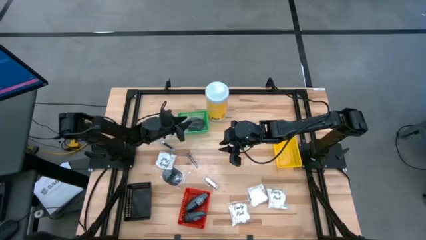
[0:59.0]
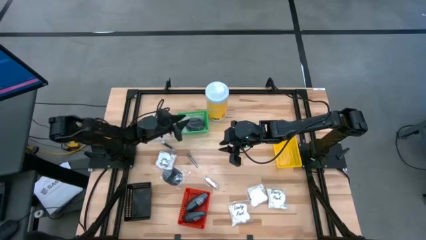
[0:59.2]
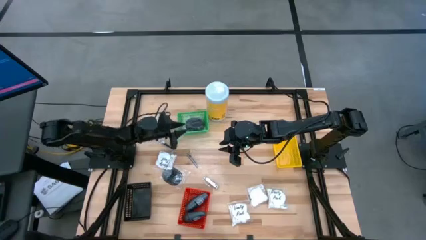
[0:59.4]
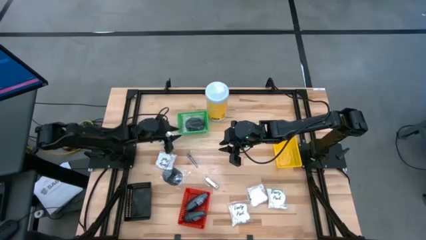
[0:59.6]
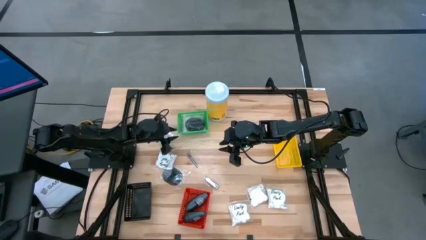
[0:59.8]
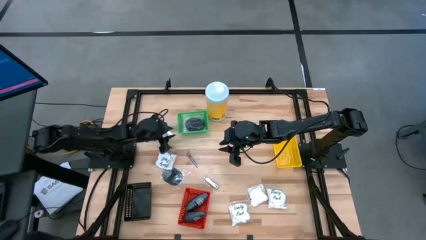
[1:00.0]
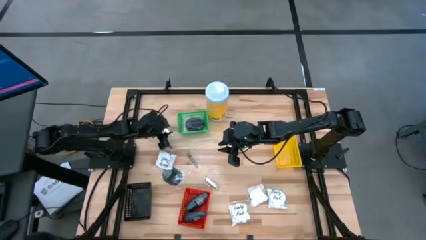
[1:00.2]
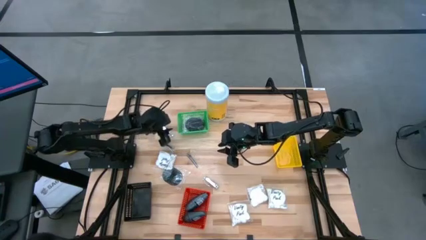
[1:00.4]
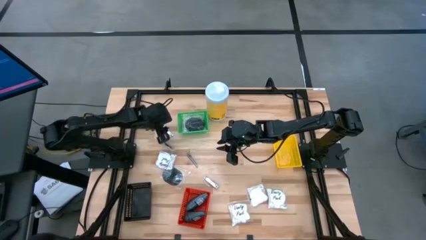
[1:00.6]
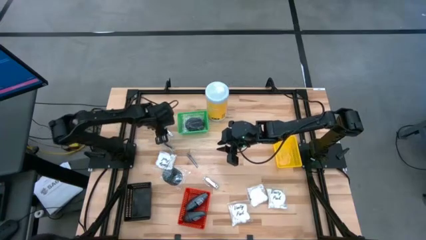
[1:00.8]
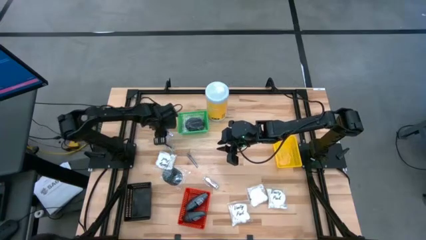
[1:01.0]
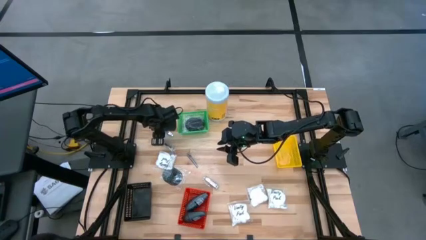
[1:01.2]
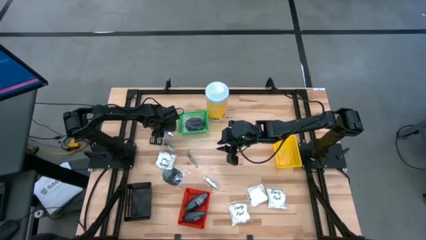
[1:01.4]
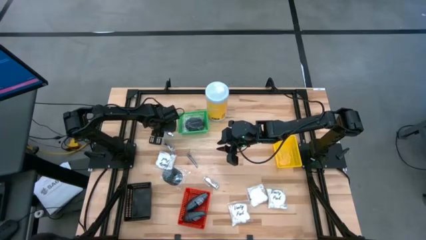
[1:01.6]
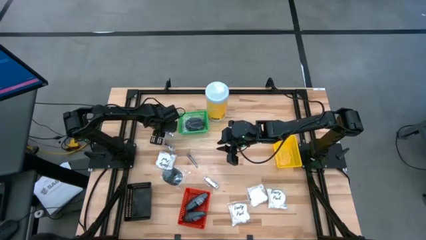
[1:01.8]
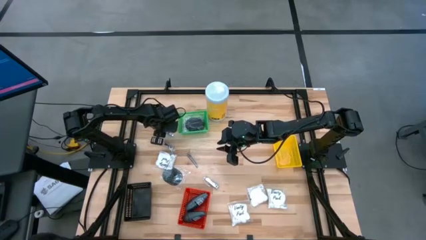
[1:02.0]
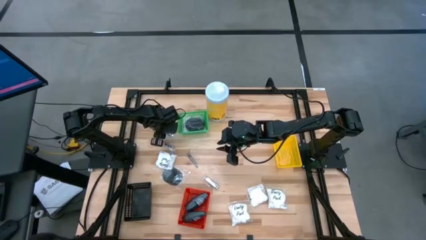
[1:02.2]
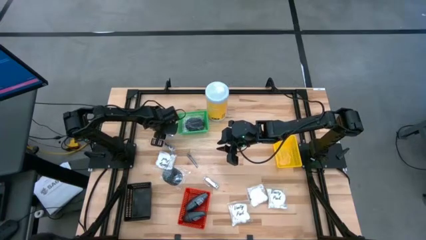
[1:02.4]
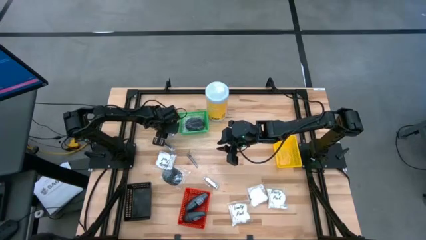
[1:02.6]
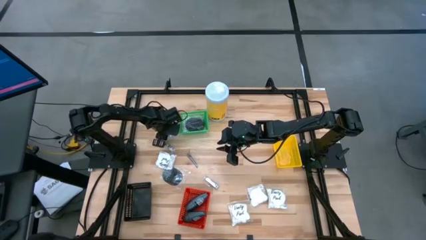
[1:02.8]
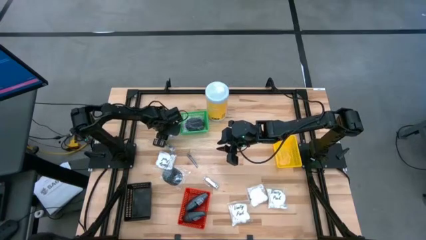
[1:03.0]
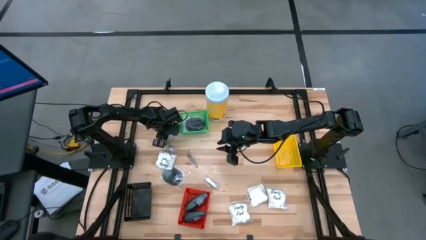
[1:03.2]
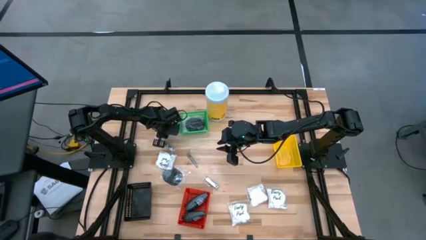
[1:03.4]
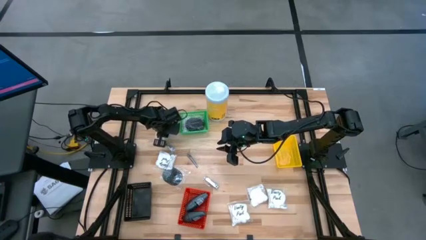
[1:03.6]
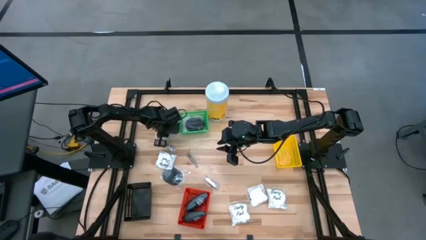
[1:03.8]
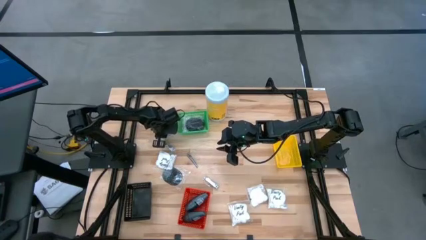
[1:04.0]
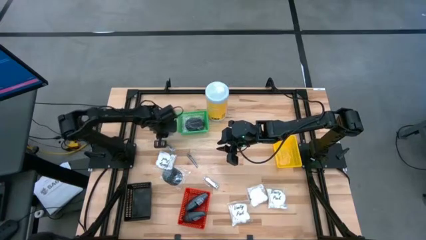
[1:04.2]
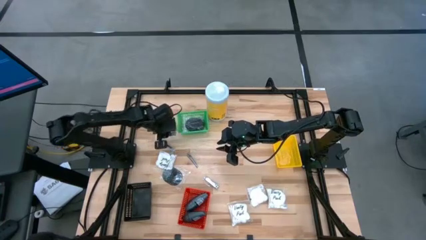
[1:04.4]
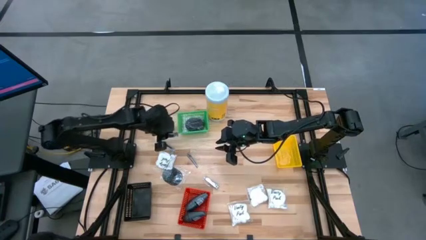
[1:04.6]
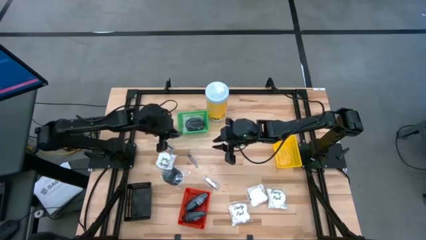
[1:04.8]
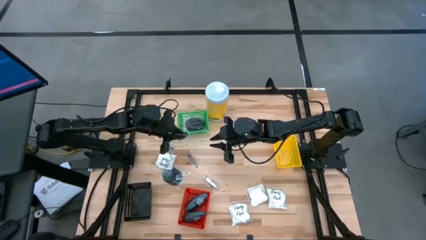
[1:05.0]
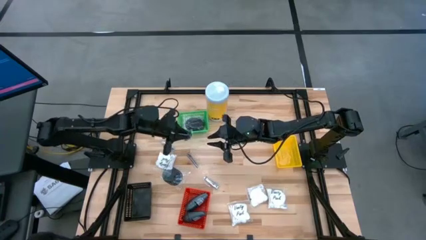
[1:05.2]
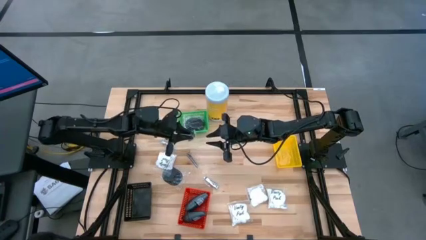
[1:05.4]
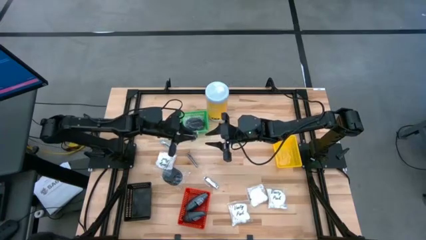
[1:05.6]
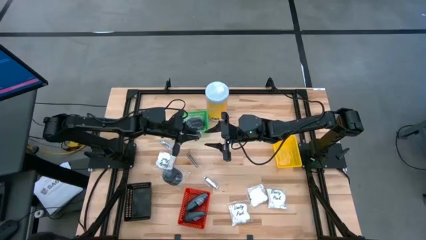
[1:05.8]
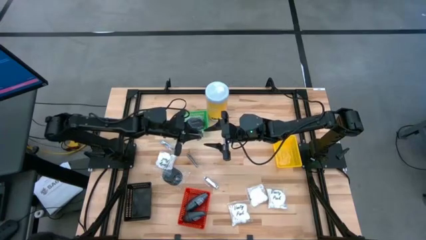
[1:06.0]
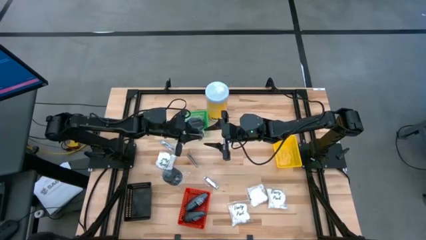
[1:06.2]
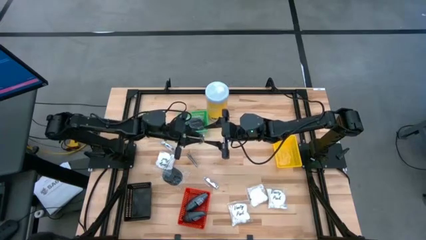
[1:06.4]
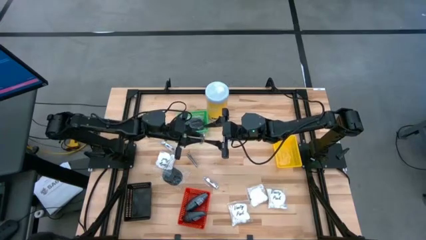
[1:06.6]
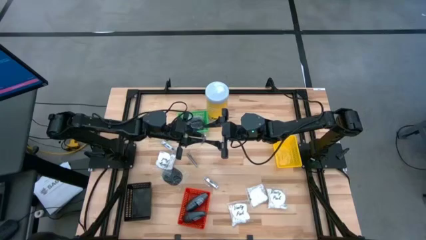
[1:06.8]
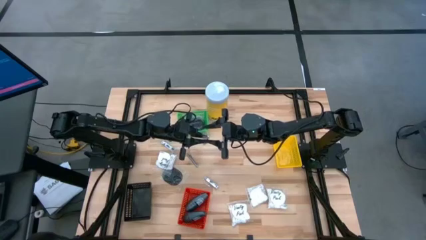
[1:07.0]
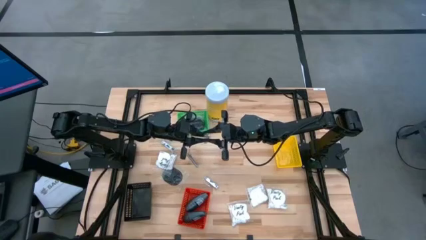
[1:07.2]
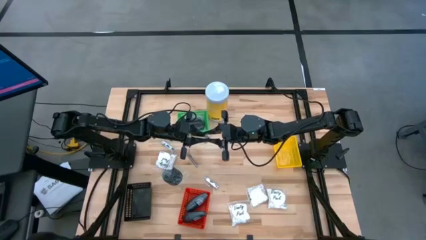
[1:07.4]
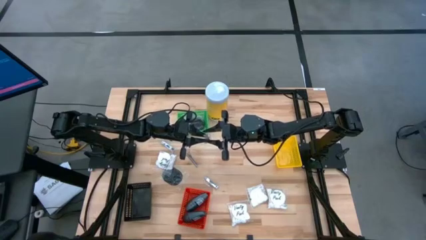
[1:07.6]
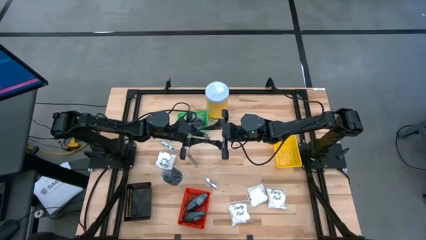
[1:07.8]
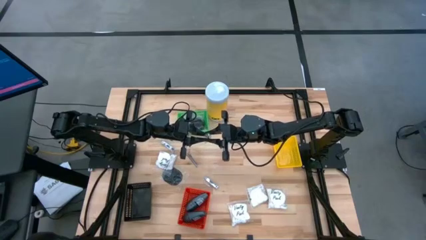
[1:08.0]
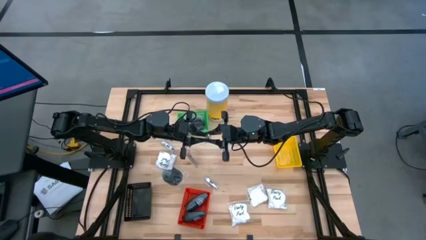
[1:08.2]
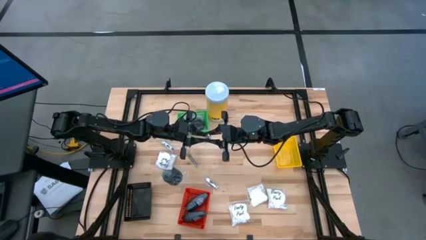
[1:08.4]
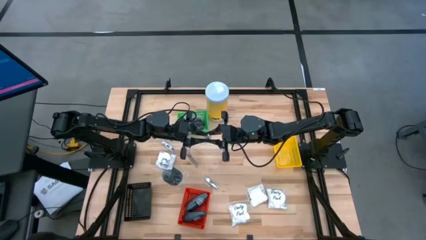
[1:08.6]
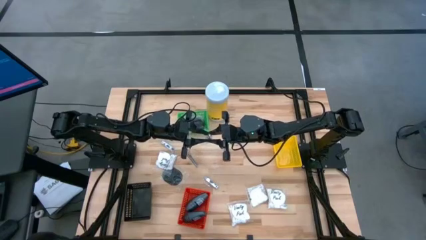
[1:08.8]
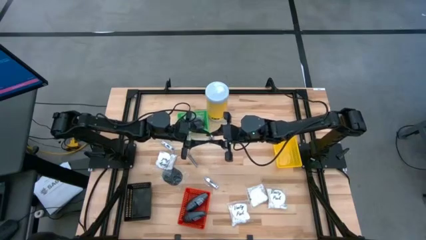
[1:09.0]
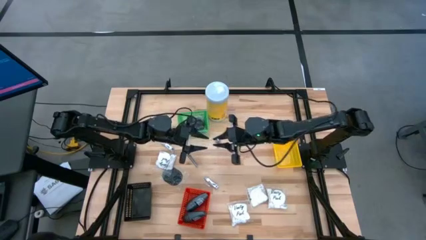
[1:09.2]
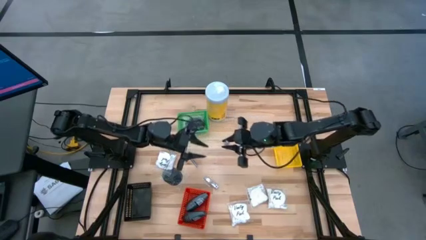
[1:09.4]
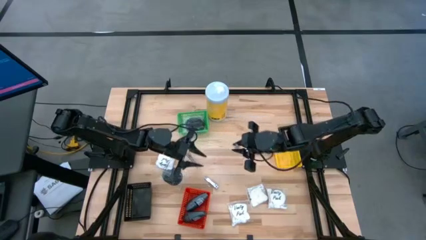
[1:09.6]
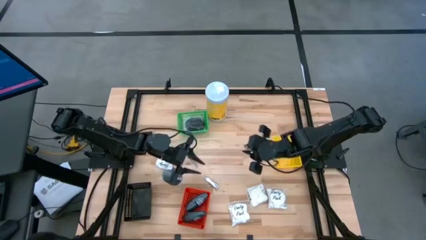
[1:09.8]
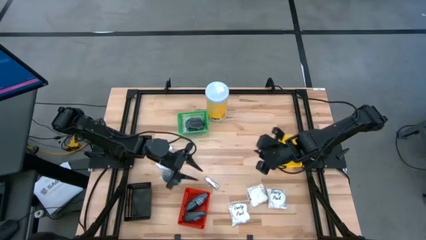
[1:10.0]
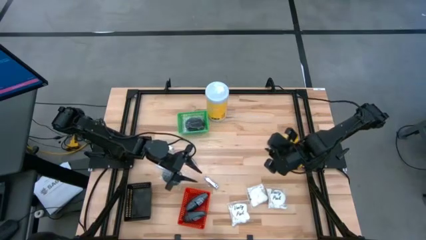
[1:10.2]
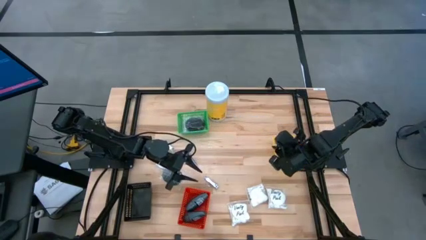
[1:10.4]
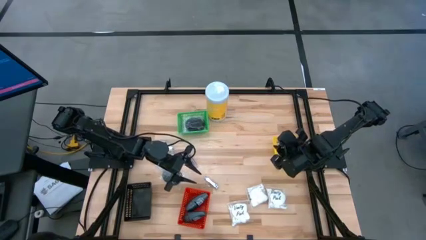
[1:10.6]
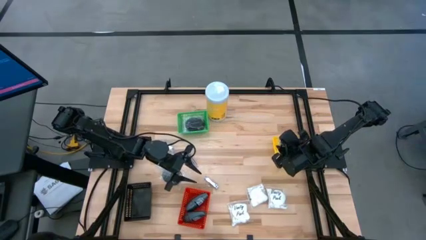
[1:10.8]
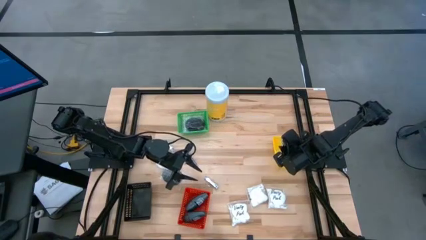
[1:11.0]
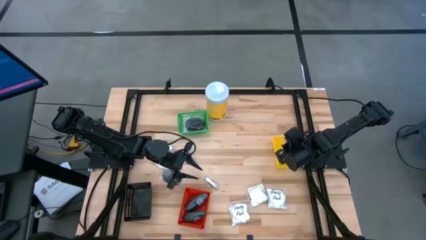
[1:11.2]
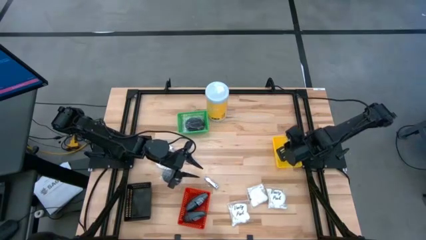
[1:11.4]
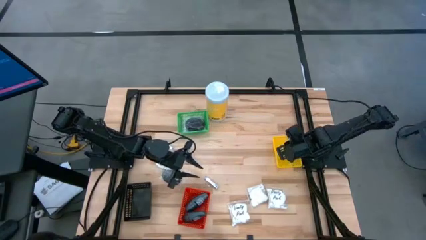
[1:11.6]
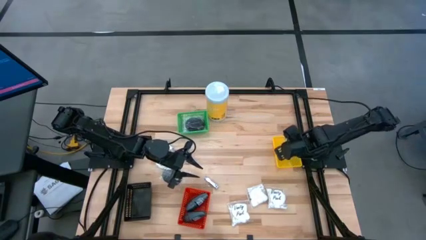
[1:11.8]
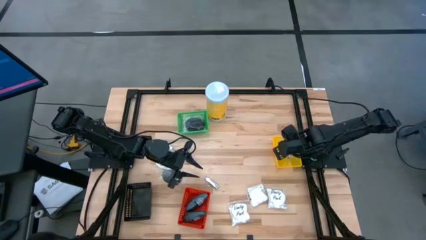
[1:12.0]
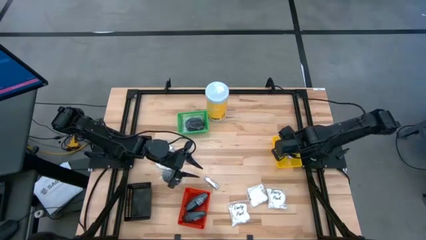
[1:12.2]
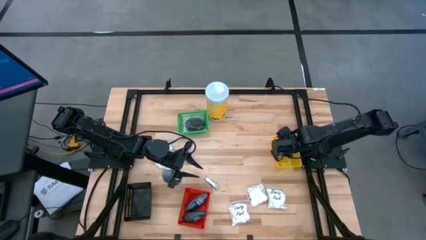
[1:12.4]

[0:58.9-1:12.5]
Task: Pick & Place Travel size toiletries
Put the silver nail cutter into the yellow bin

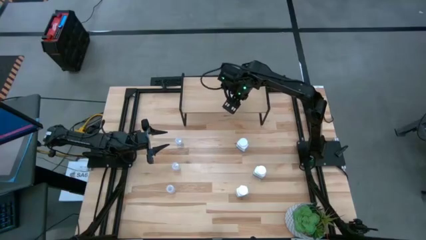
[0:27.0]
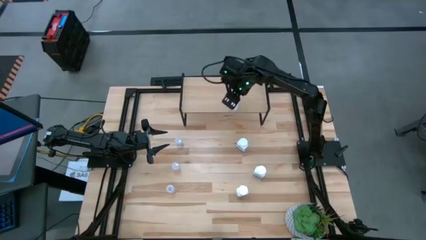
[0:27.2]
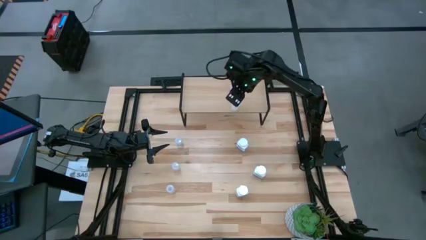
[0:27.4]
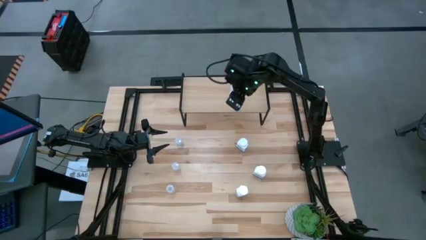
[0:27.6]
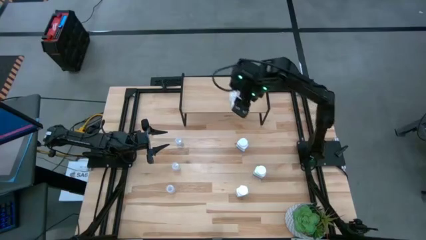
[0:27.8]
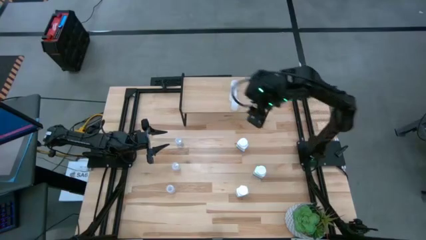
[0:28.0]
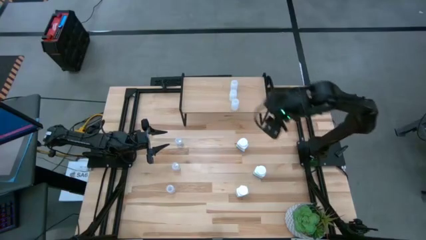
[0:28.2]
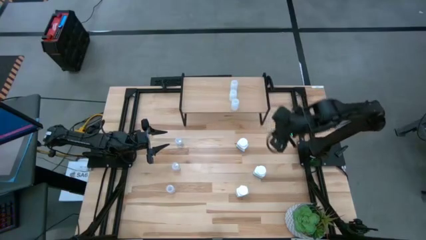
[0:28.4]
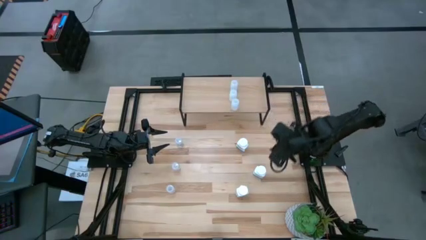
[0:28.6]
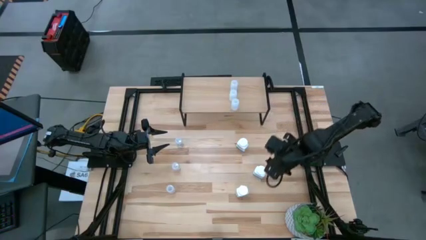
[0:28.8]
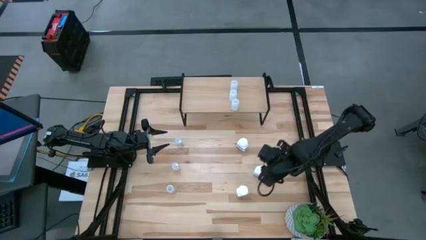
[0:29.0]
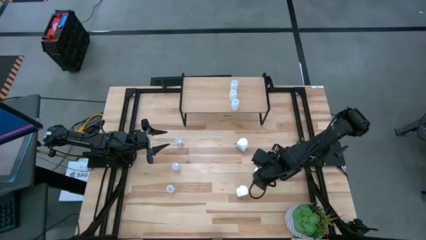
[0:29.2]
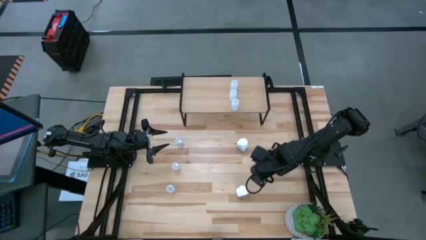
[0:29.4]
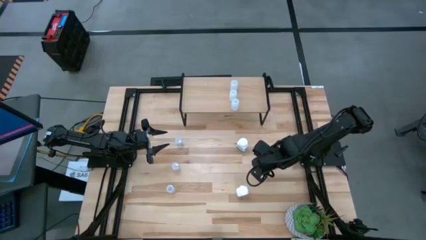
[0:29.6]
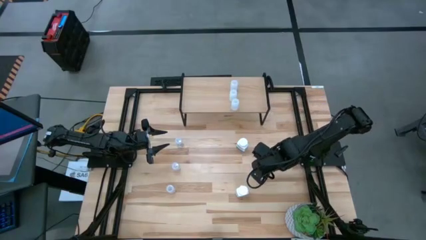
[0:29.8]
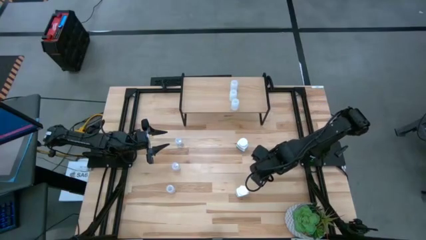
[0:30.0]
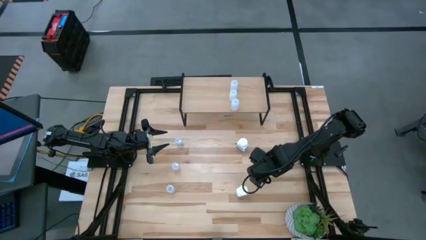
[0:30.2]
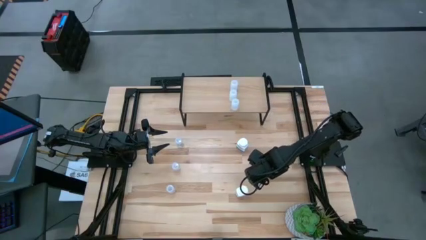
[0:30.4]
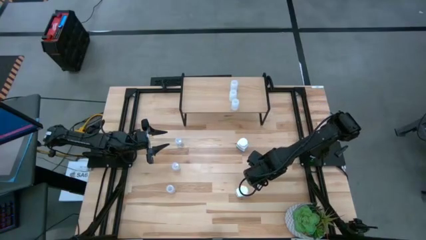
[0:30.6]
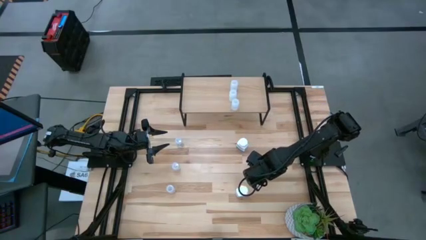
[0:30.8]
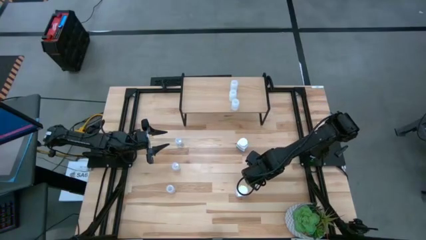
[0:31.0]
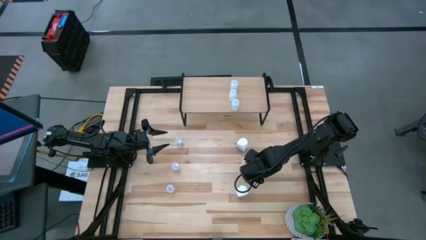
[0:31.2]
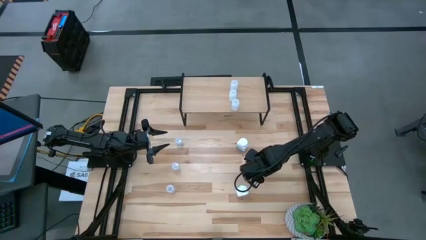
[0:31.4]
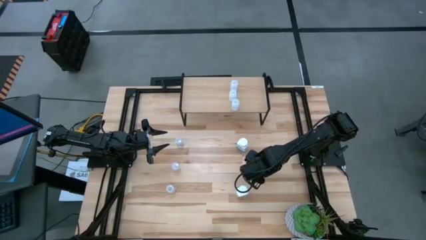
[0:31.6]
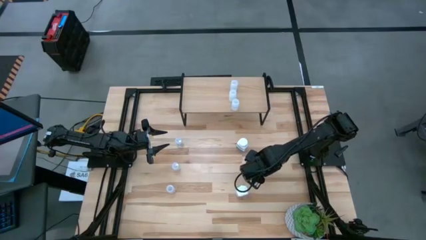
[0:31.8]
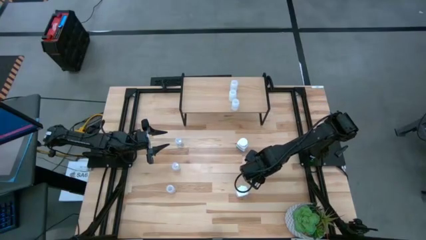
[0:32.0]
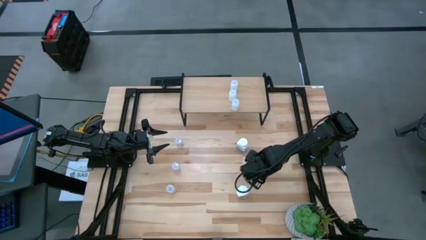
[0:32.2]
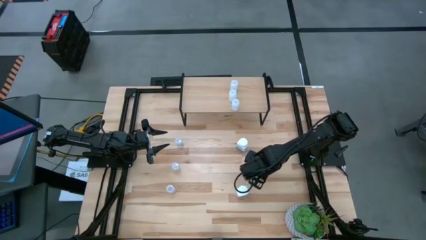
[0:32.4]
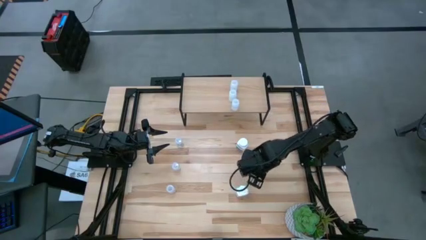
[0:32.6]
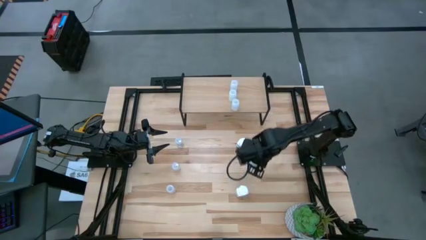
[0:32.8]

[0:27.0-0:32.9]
Task: Pick and place medicine bottles onto shelf by color
Put the large white pill bottle on the shelf
